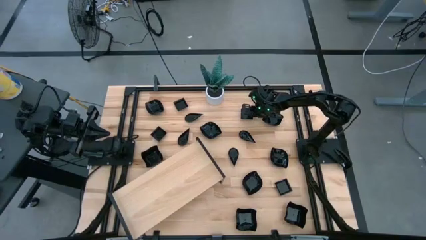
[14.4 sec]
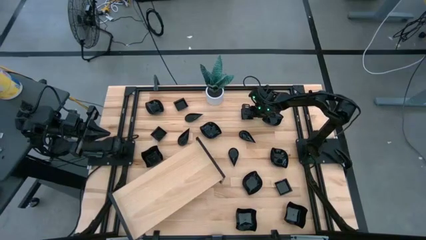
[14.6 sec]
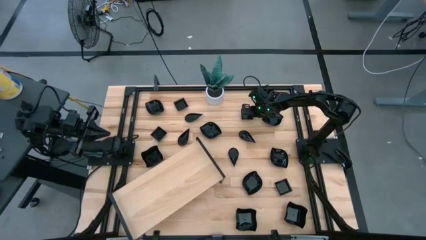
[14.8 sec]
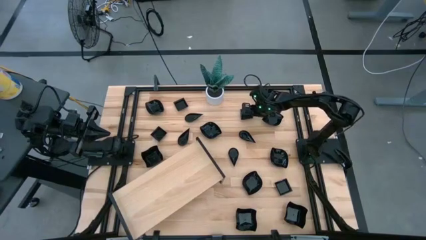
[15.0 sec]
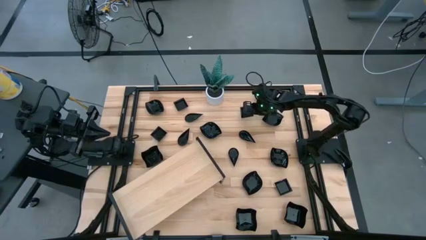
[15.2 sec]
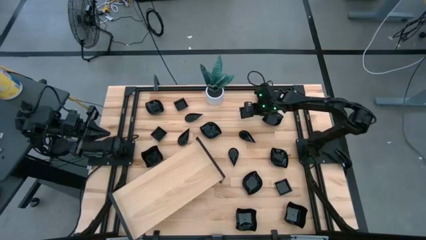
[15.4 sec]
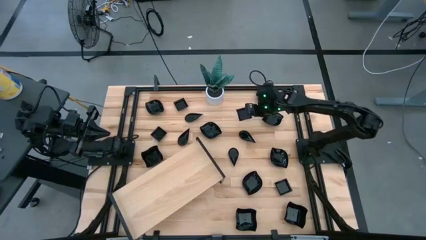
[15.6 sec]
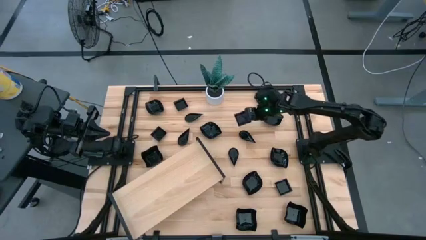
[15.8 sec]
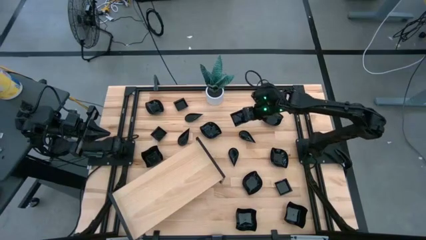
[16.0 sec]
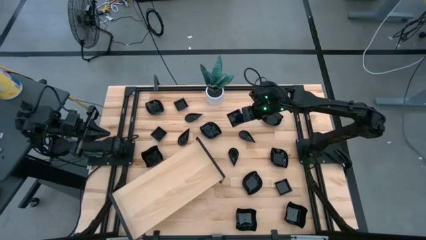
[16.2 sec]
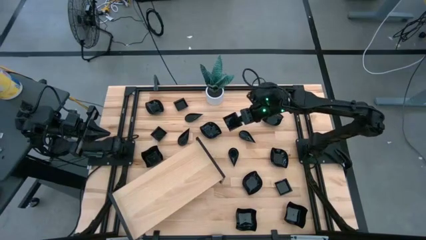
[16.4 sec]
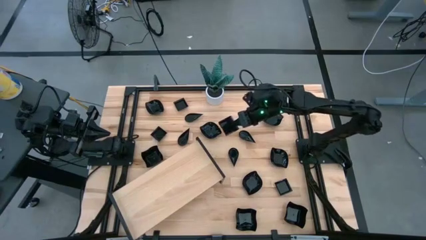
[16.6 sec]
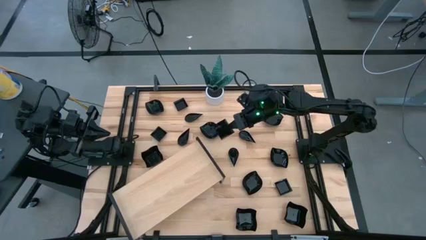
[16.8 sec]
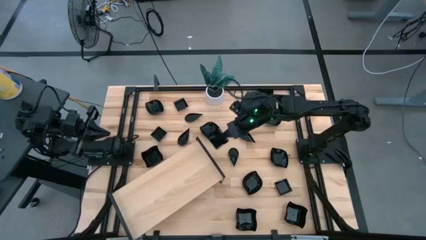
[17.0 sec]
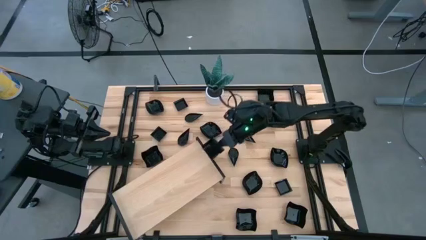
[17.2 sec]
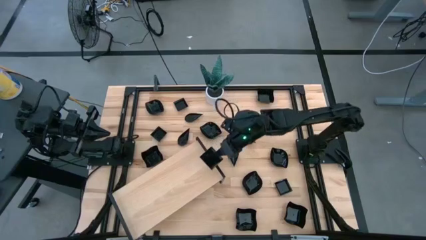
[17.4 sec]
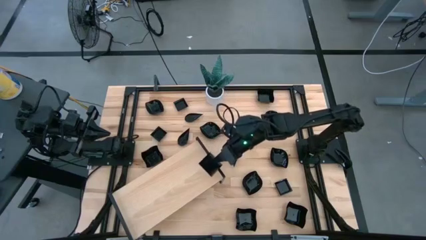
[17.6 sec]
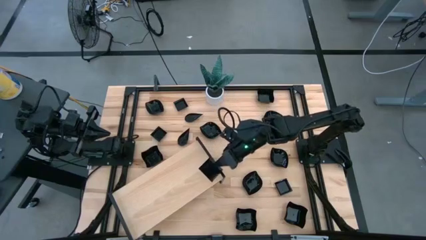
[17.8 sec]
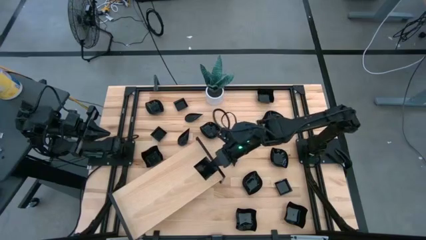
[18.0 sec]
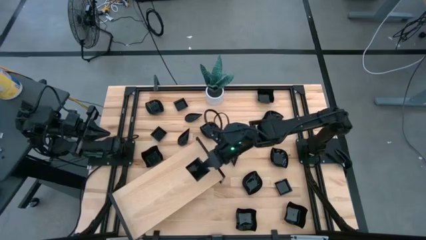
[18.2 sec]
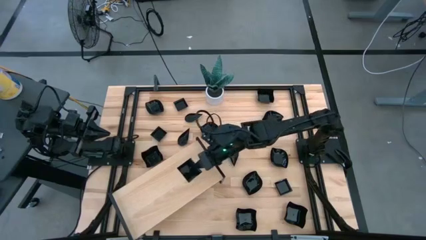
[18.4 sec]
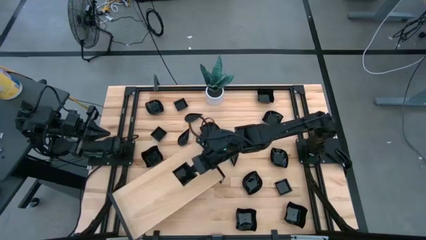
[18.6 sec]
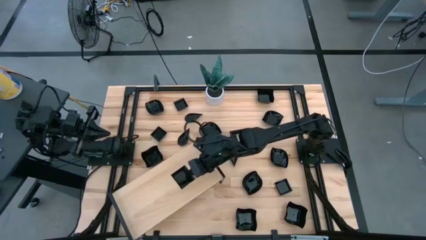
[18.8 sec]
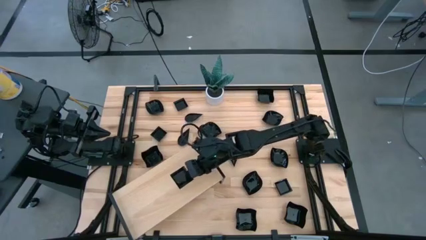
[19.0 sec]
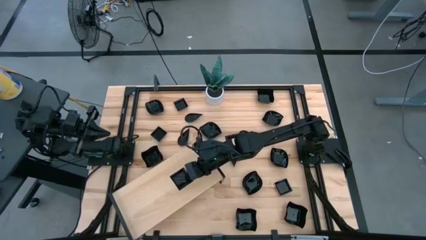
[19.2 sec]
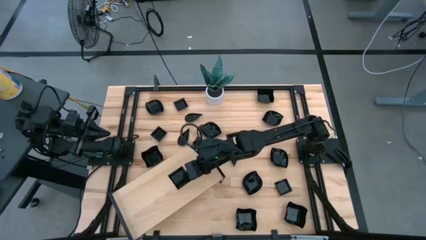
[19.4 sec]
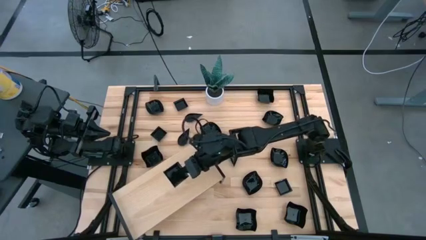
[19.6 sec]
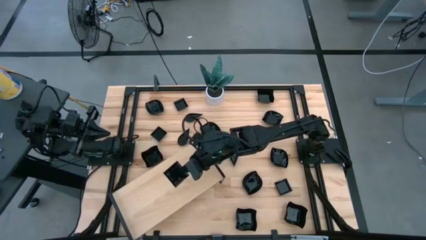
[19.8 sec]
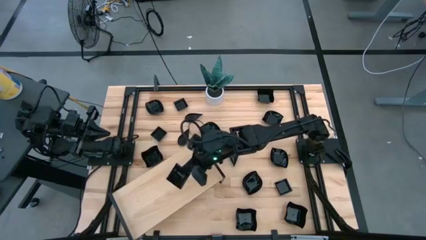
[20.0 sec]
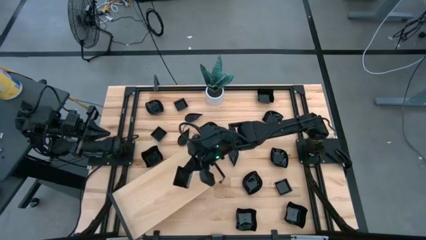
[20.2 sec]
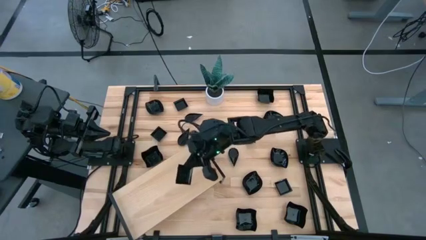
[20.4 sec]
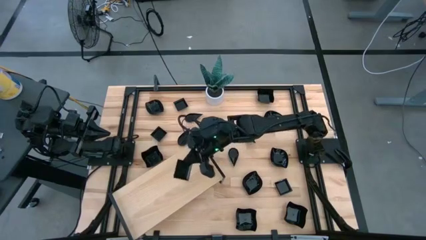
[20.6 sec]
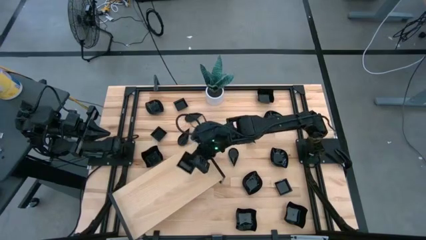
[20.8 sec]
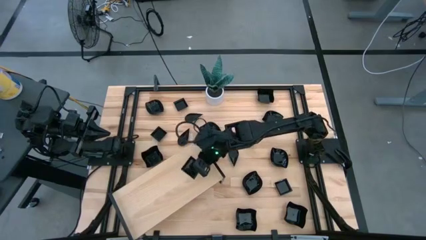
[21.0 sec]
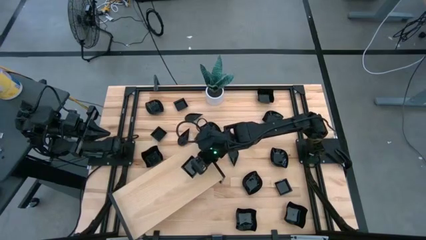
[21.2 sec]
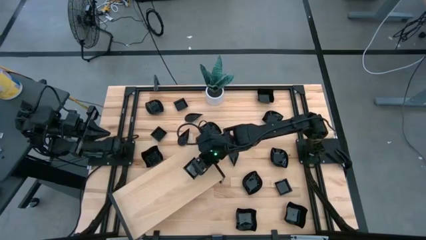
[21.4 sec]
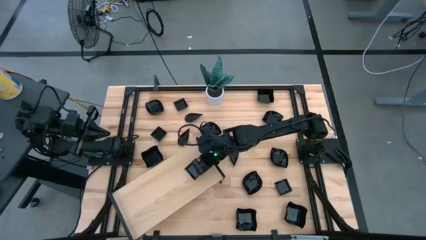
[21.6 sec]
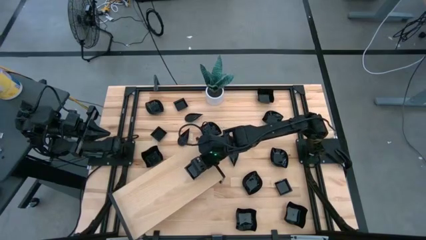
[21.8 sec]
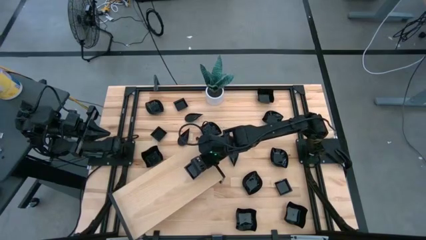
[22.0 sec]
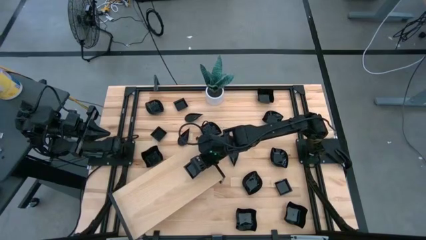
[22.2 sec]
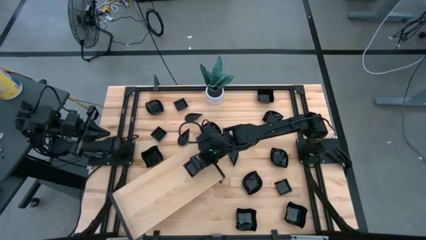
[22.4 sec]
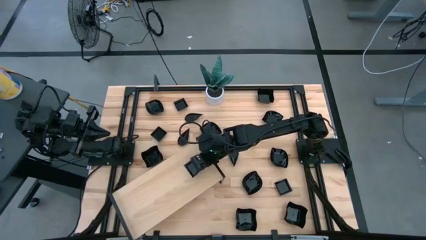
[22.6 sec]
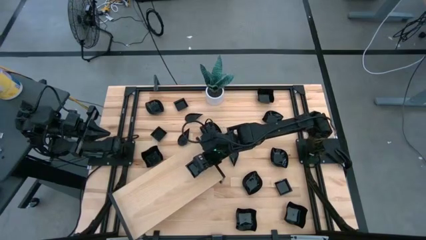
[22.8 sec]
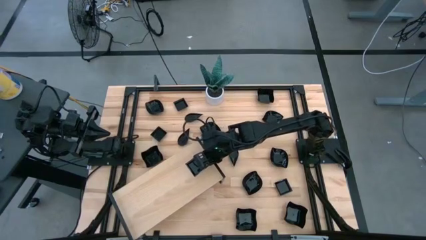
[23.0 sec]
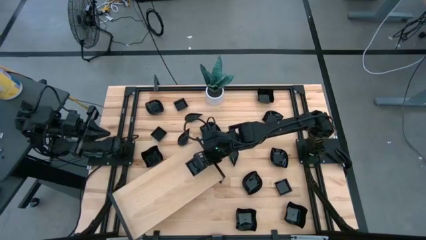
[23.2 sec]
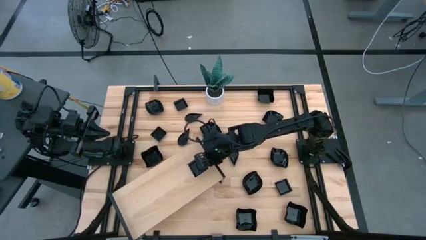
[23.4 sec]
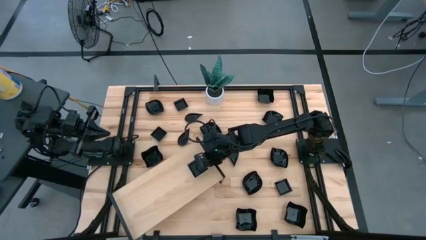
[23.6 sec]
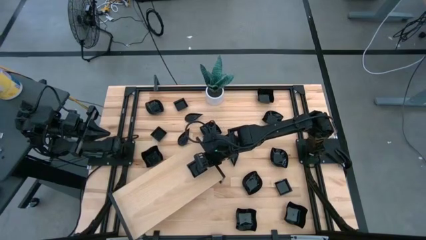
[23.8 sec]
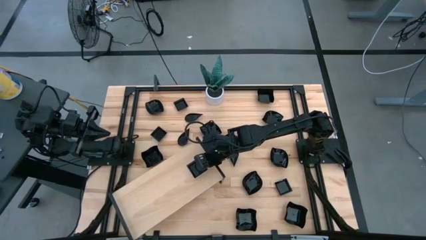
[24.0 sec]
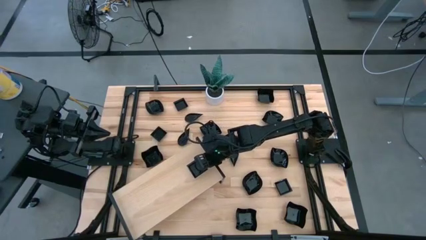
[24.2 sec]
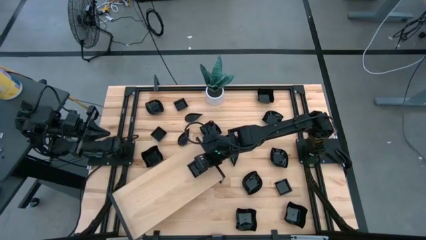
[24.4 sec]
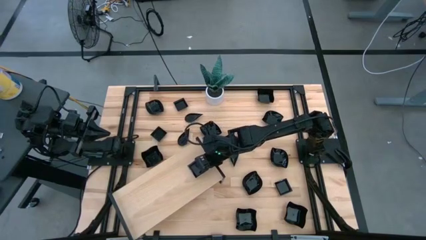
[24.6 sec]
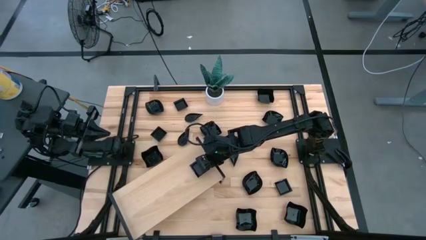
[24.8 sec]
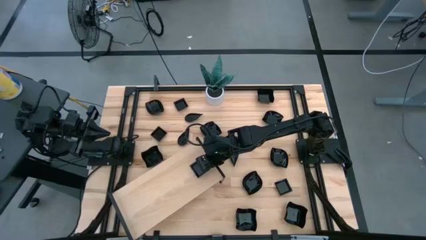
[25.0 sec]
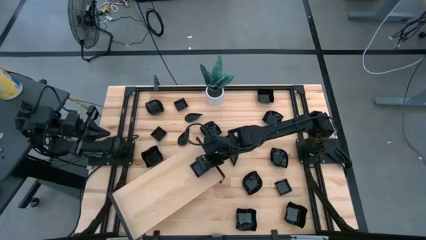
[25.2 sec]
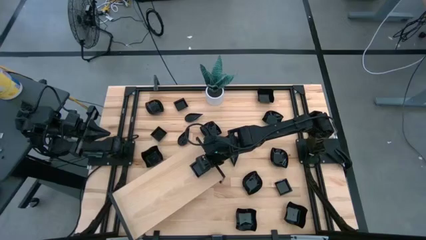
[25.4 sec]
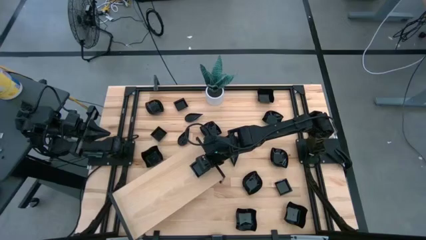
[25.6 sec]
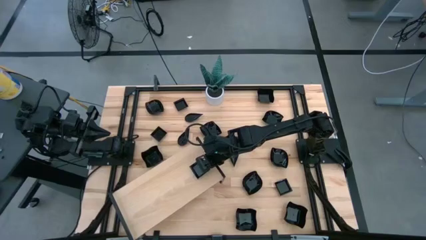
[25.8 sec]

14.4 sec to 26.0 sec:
Task: Pick & Place Mini shaped plates
Put the black square plate on the shelf
